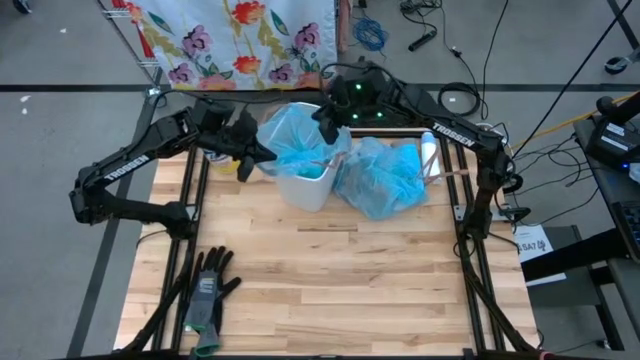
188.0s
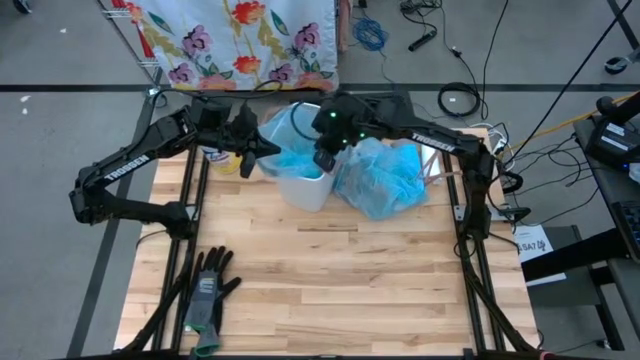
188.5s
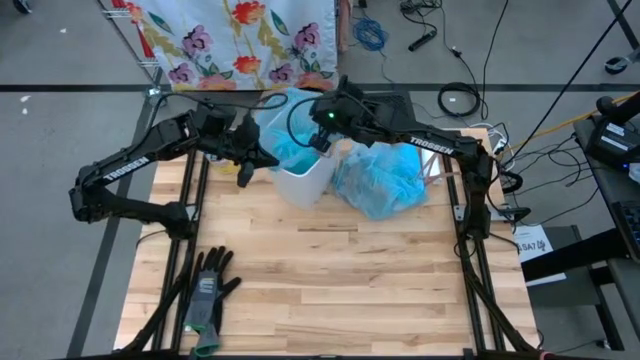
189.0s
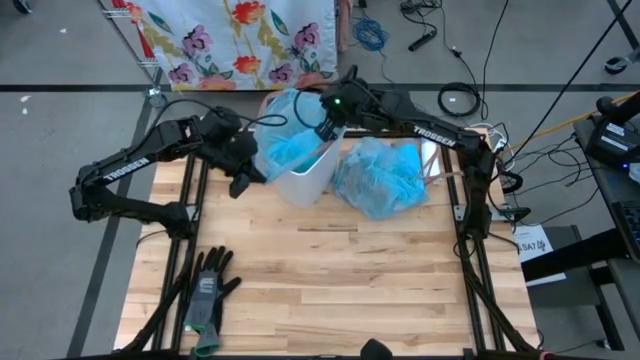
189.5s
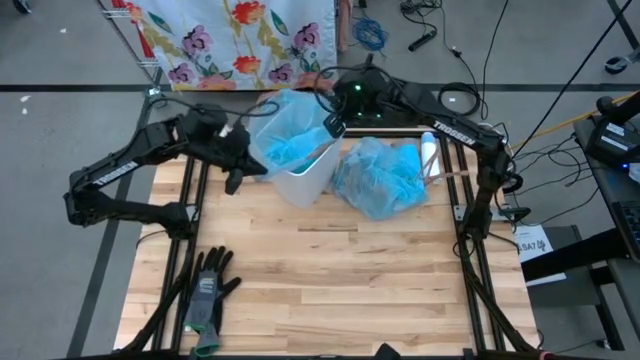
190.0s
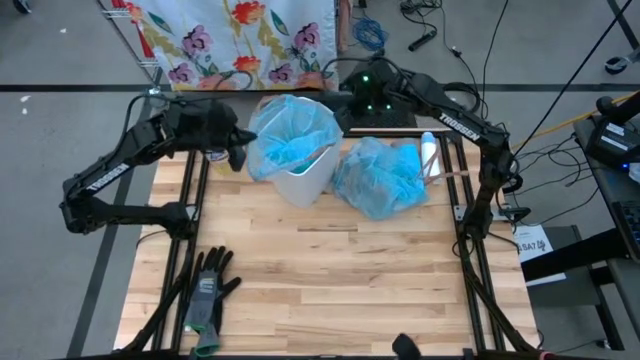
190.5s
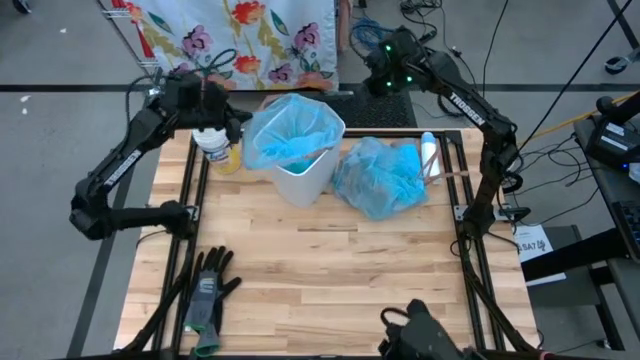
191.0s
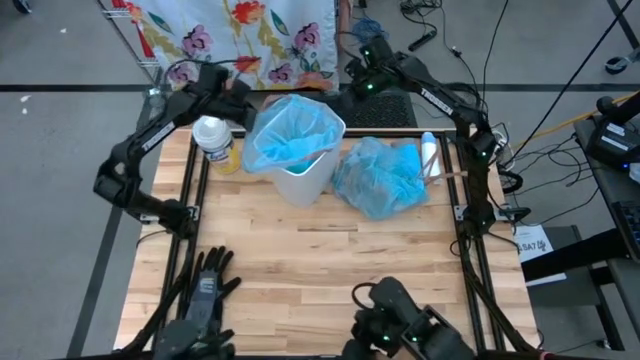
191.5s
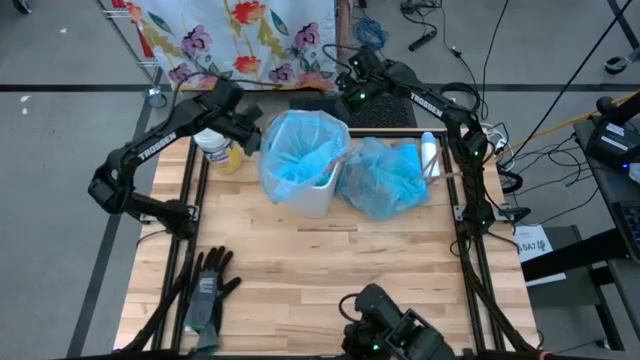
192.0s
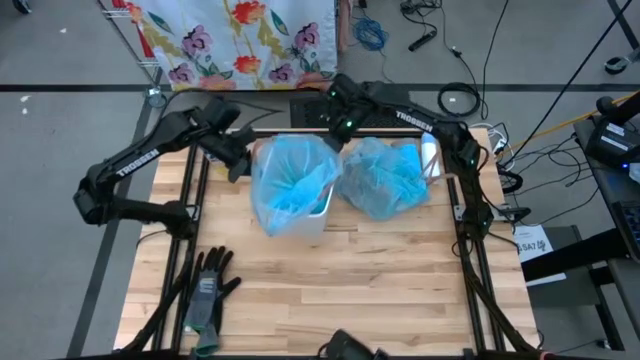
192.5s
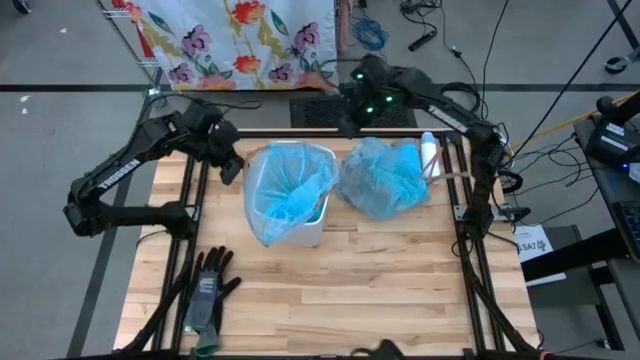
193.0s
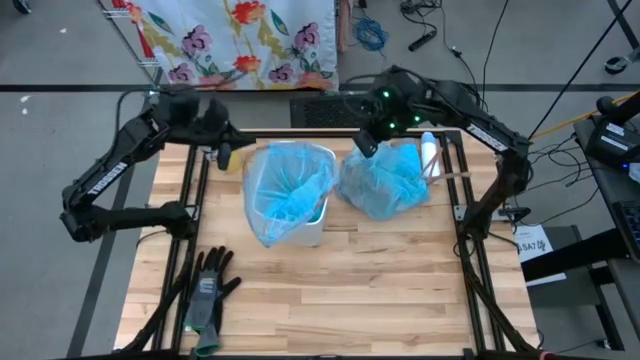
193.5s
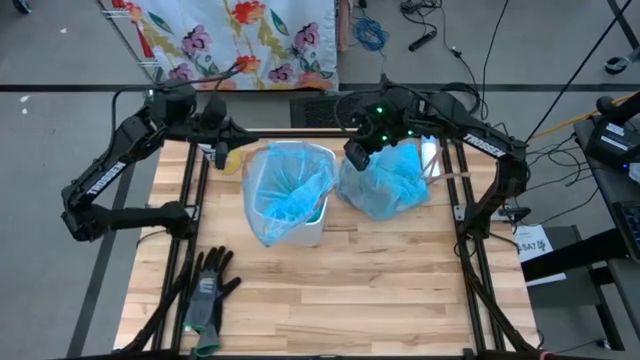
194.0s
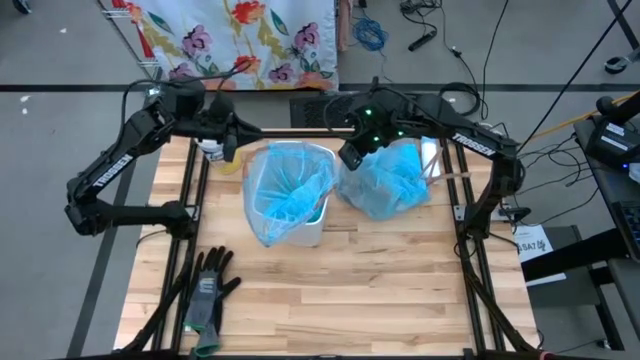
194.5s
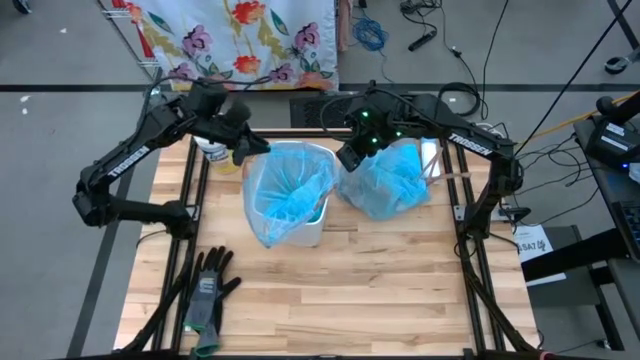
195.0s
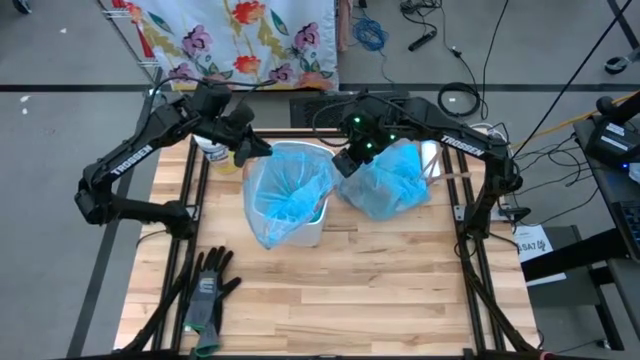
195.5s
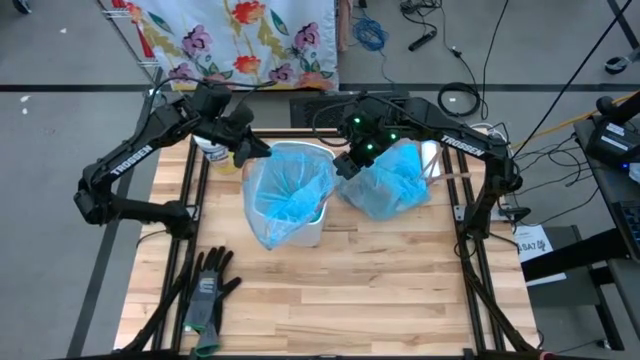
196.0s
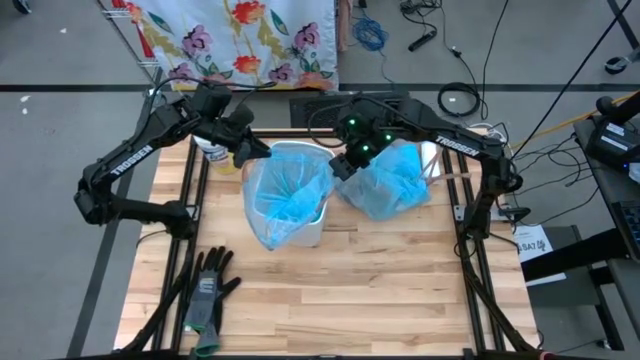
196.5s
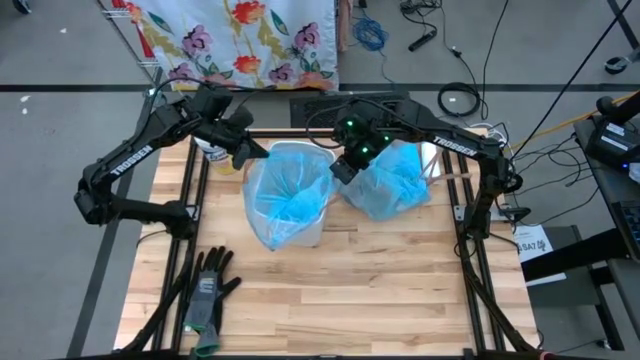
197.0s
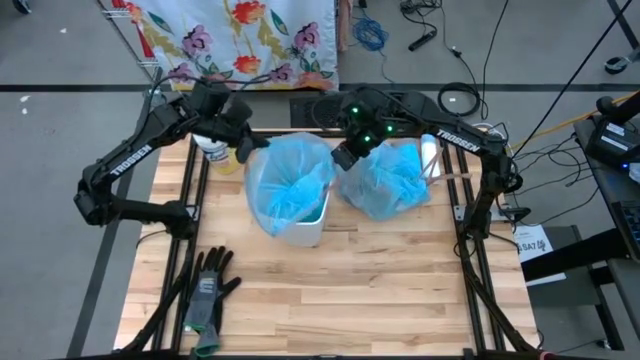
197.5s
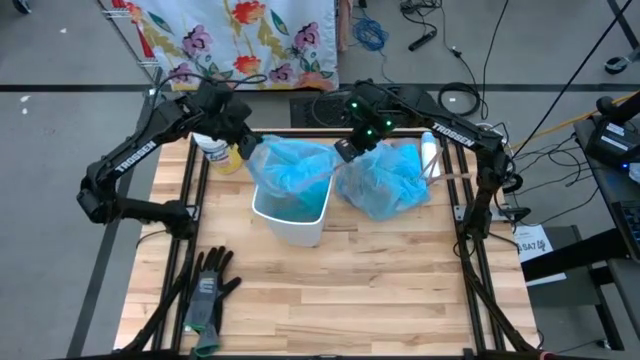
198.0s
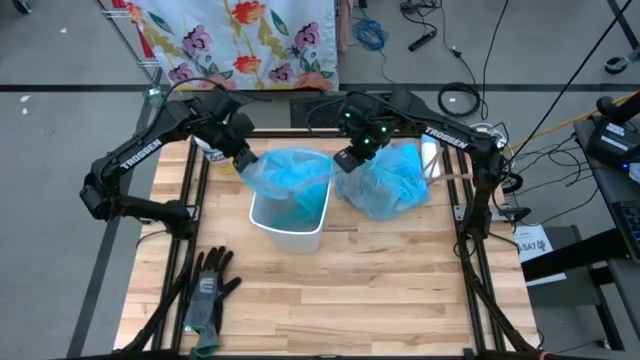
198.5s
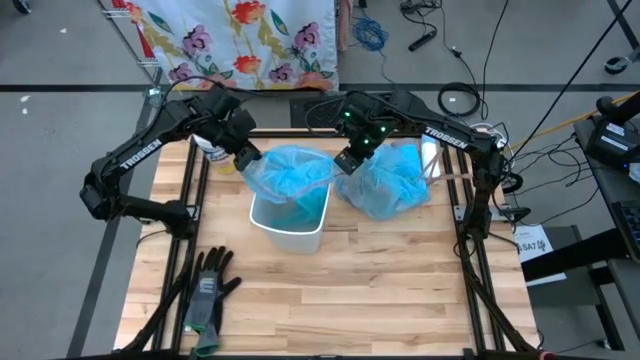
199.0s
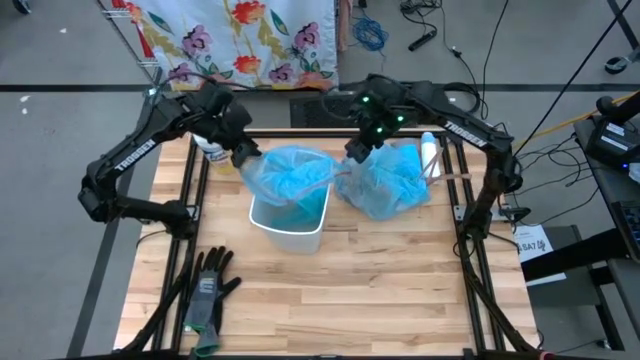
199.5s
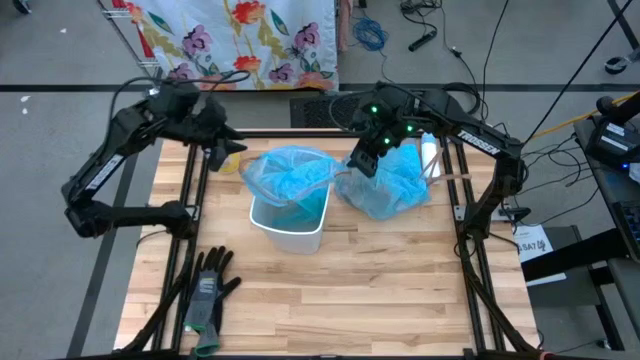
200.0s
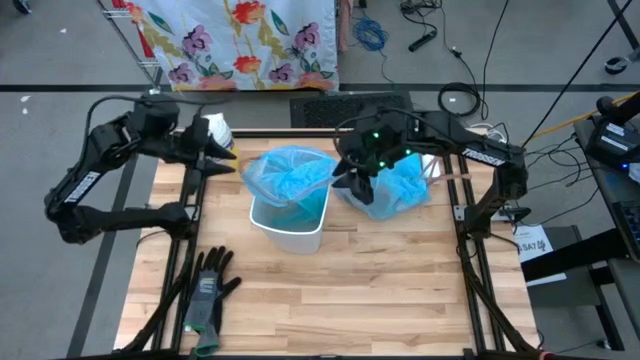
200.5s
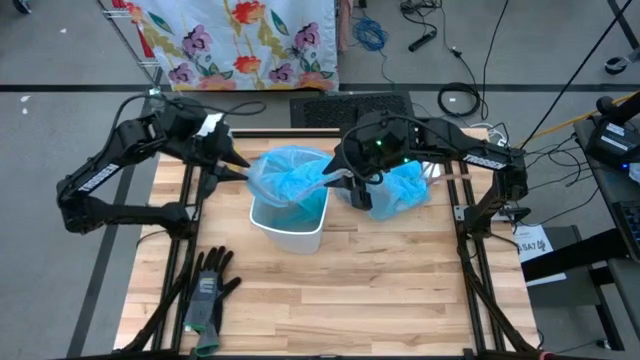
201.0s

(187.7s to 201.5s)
Task: place trash/remove bag and relplace
Insert the new trash bag into the trash bin

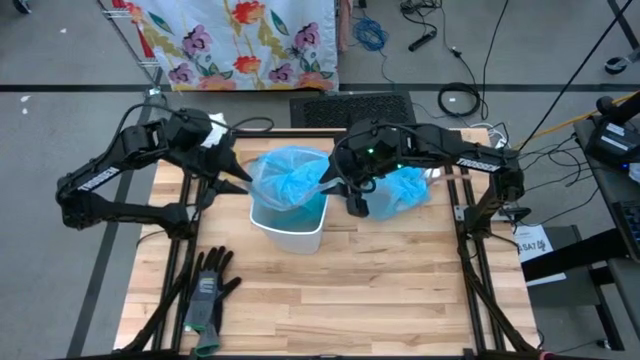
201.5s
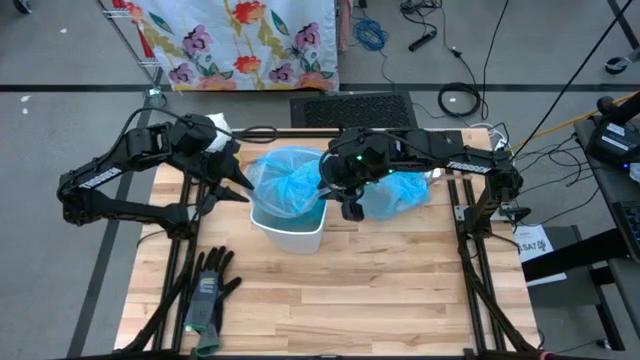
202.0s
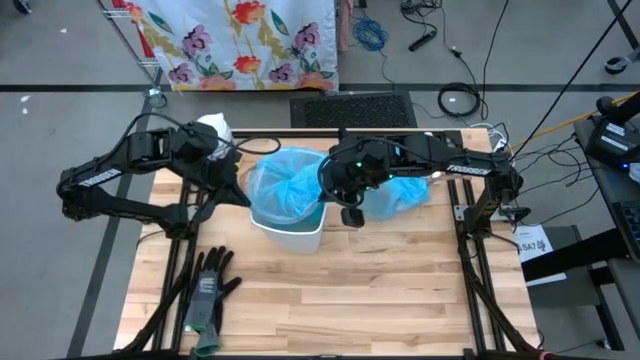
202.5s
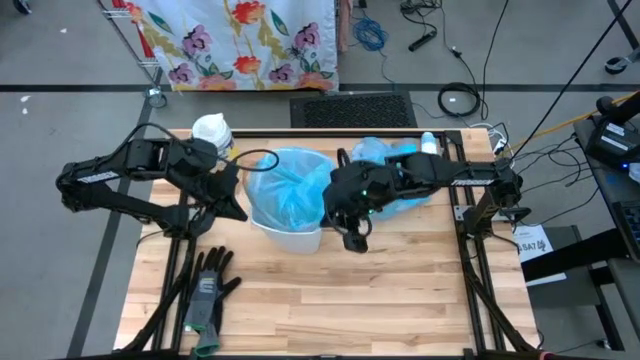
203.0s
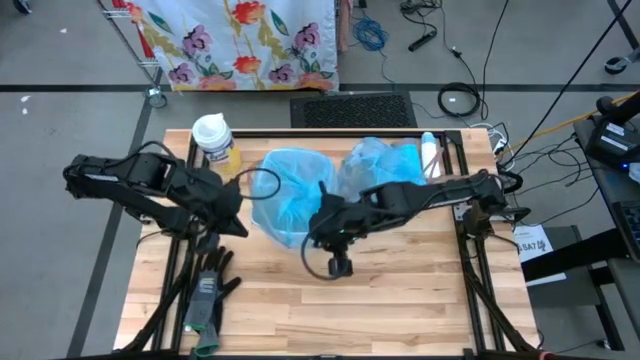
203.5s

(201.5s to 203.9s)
Insert the new trash bag into the trash bin

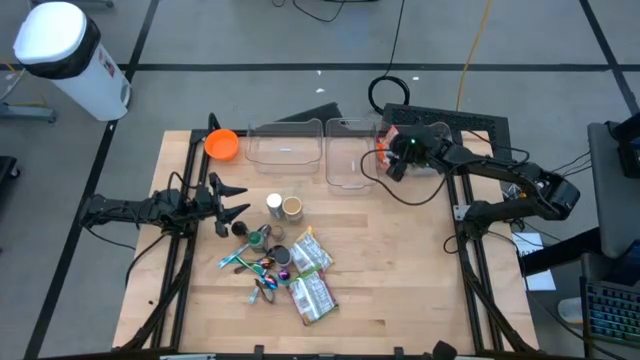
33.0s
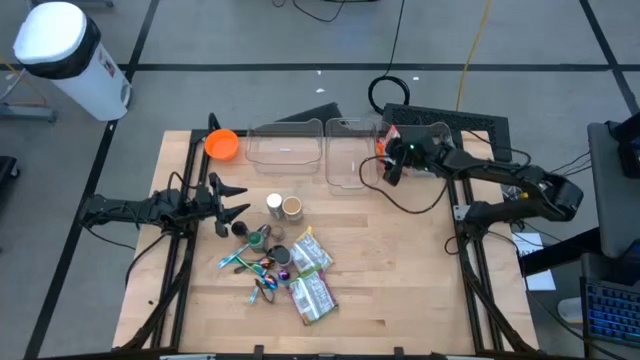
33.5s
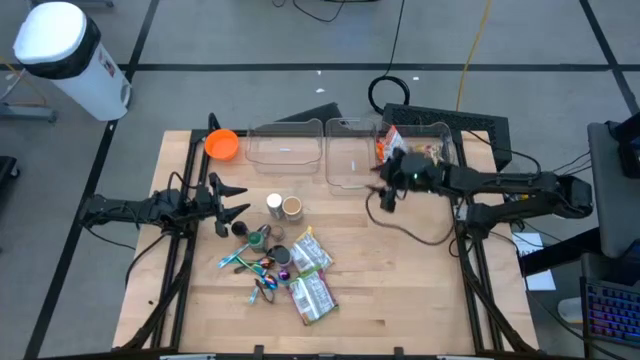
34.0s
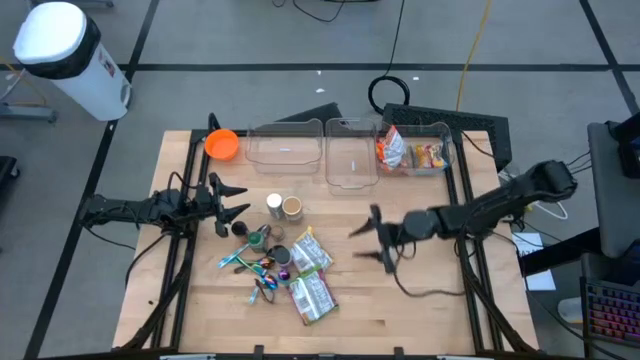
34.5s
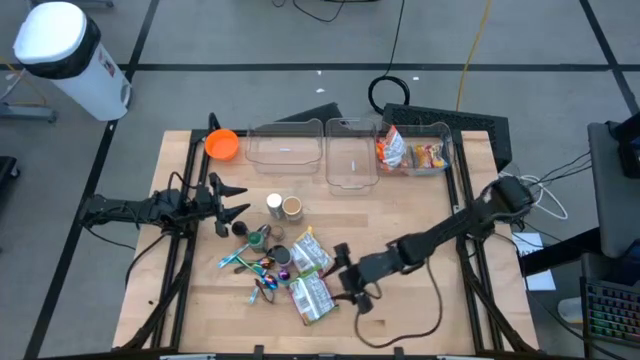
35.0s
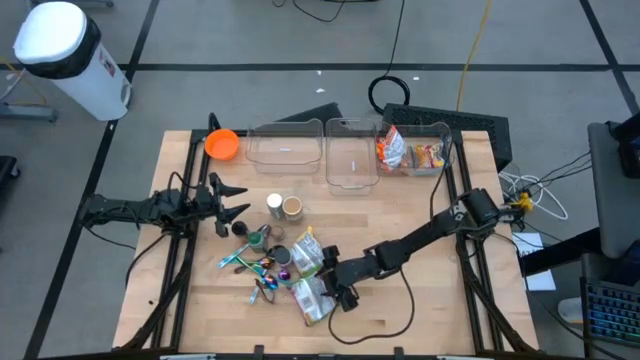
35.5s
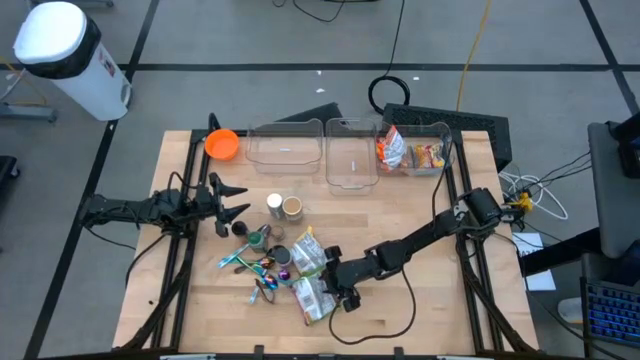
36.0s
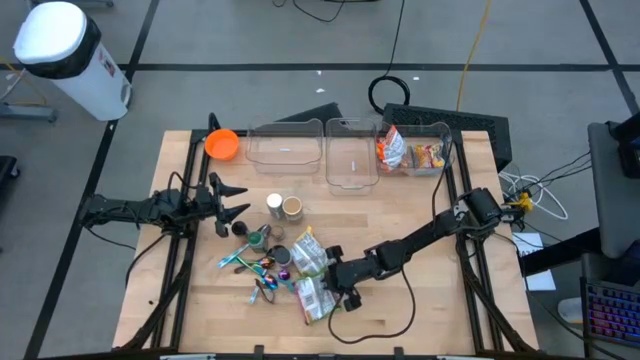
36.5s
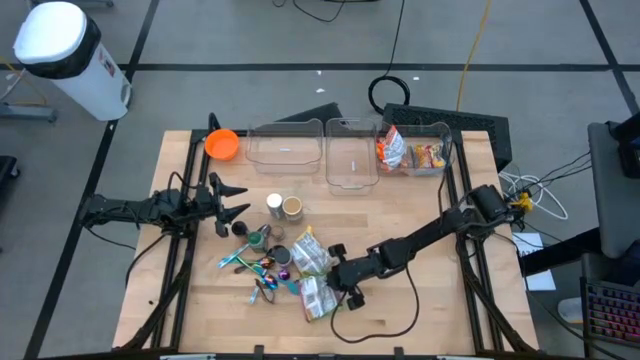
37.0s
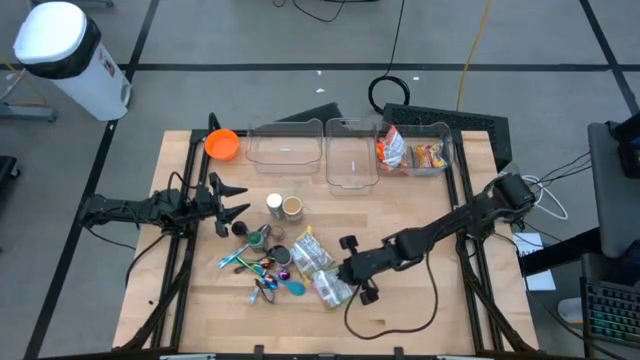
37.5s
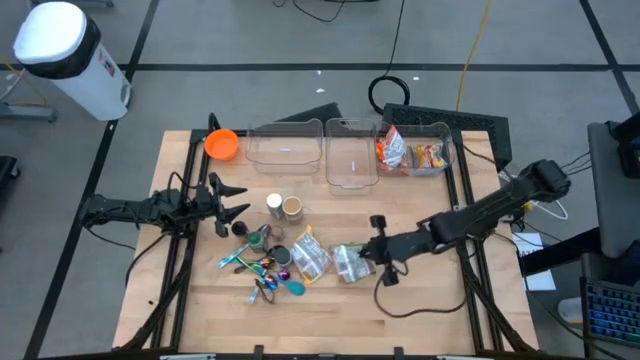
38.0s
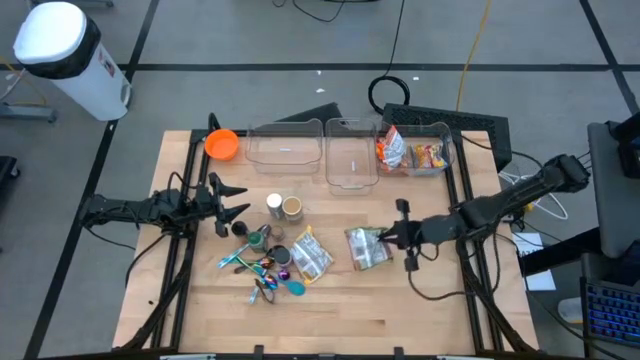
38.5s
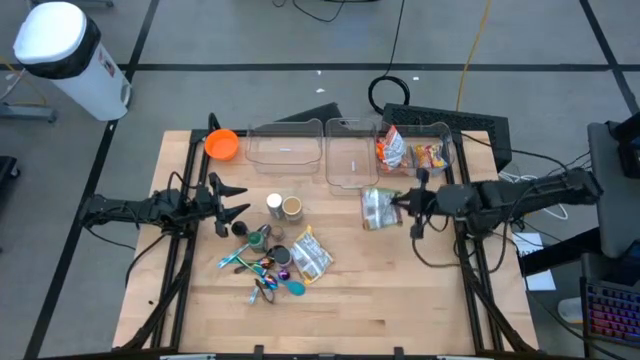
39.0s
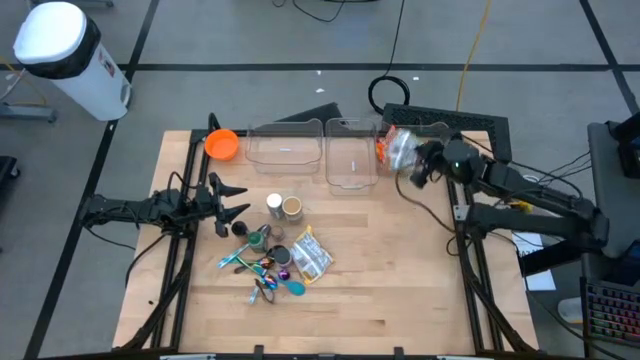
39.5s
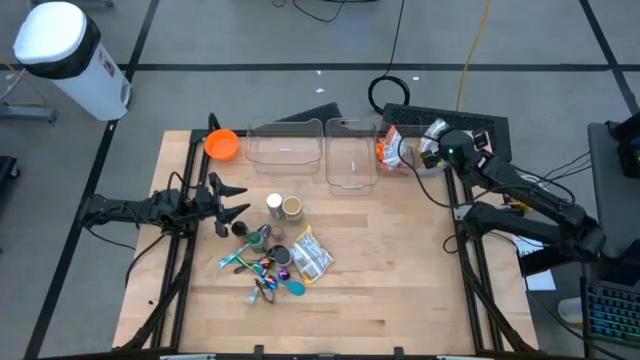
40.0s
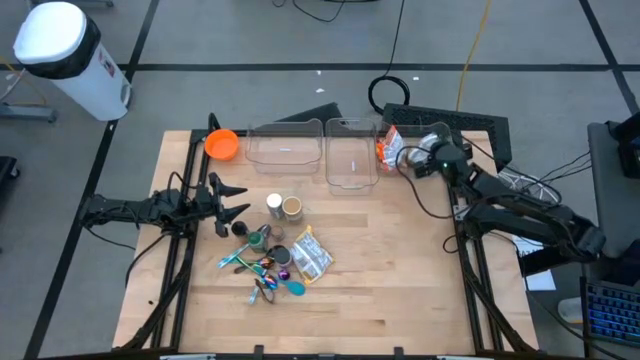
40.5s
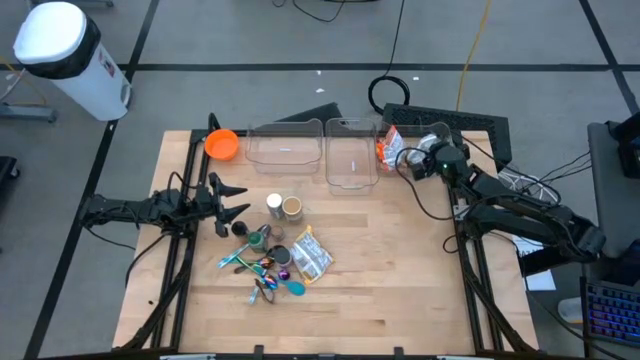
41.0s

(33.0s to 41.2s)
Task: Pick & Place Food Item
Put the green noodle pack into the right transparent bin
